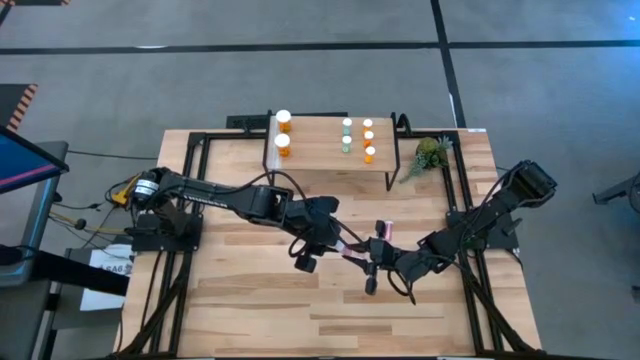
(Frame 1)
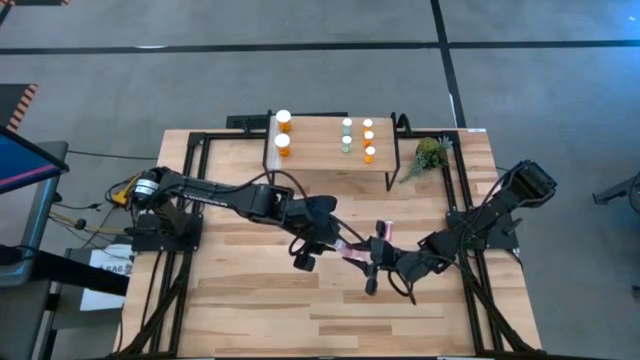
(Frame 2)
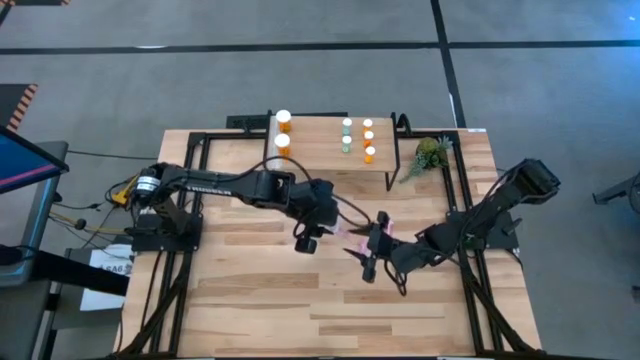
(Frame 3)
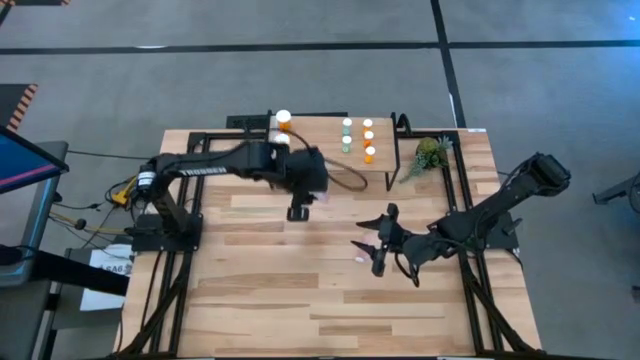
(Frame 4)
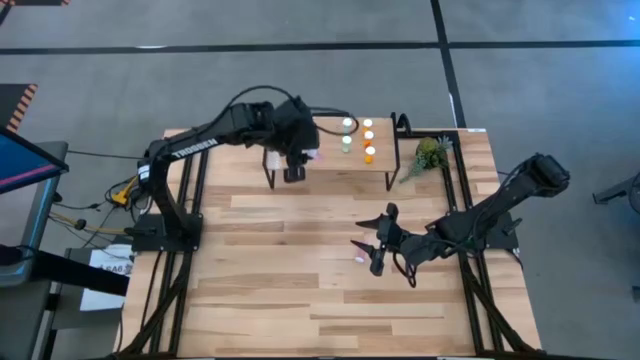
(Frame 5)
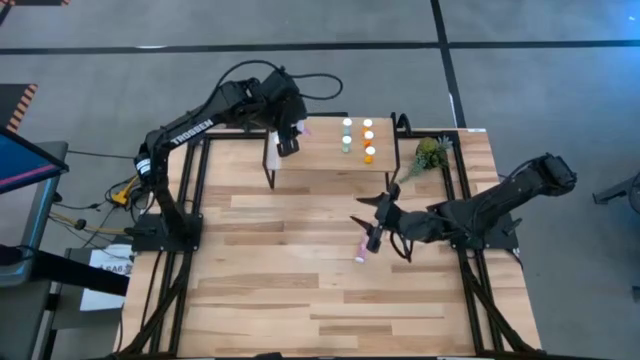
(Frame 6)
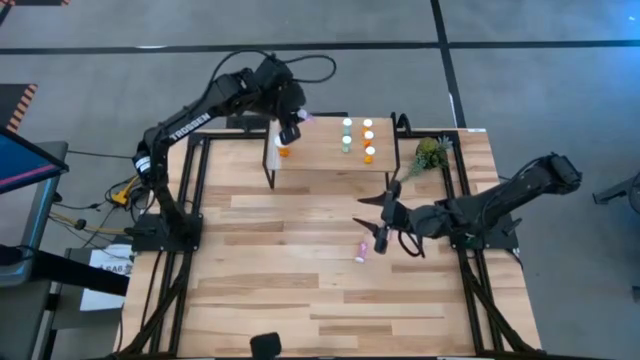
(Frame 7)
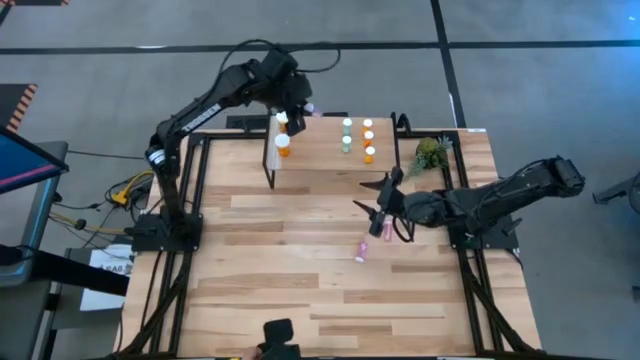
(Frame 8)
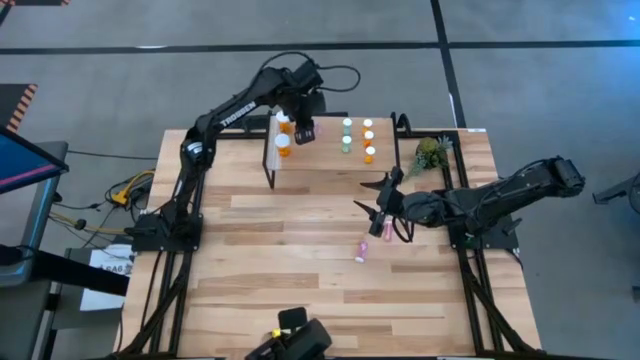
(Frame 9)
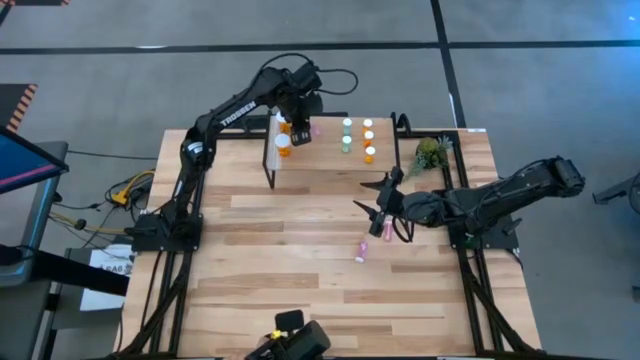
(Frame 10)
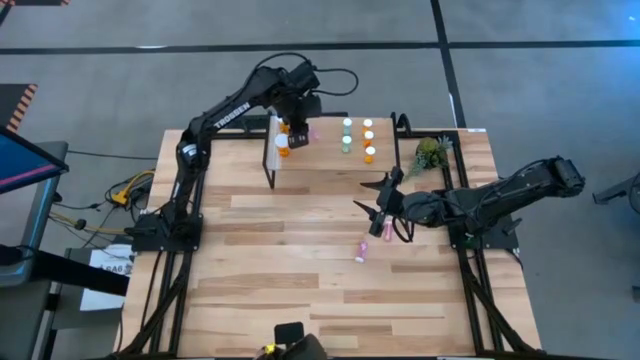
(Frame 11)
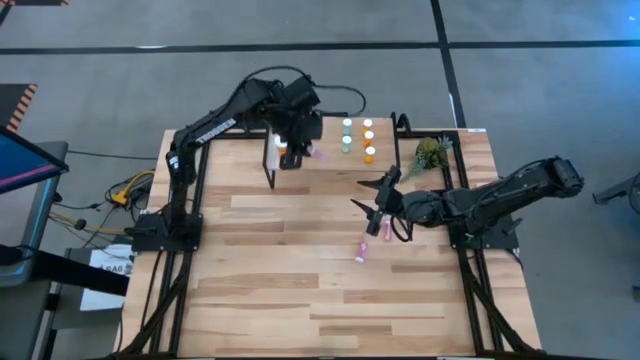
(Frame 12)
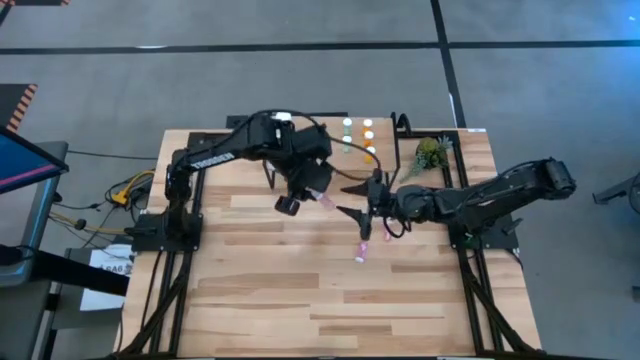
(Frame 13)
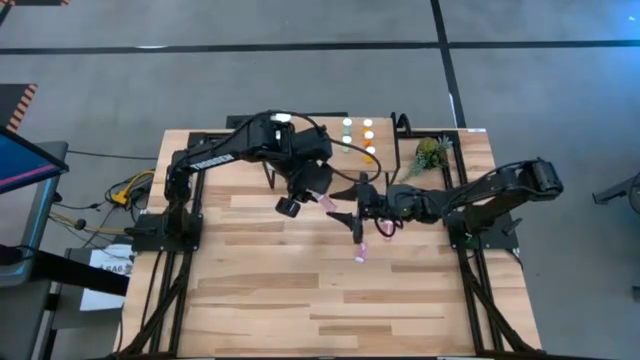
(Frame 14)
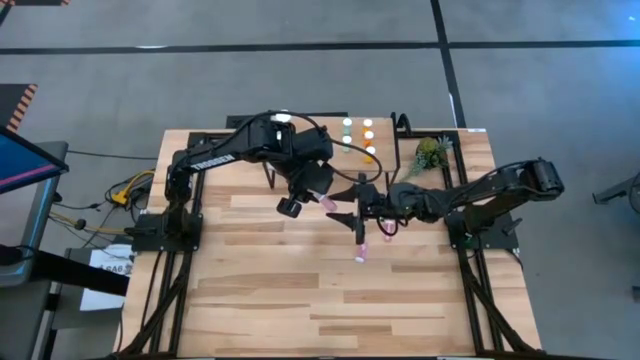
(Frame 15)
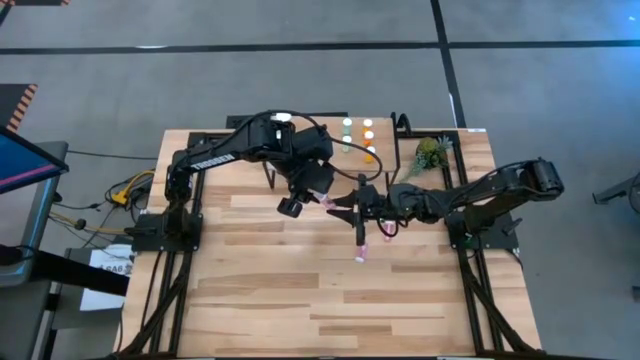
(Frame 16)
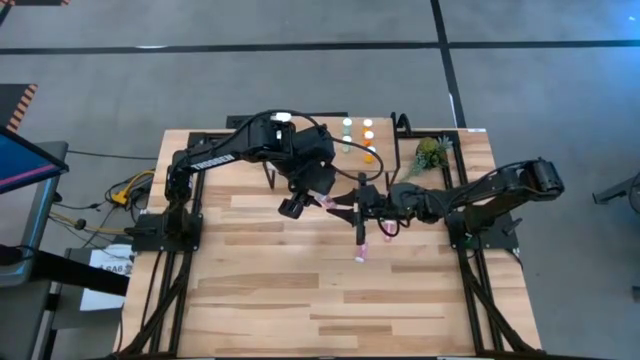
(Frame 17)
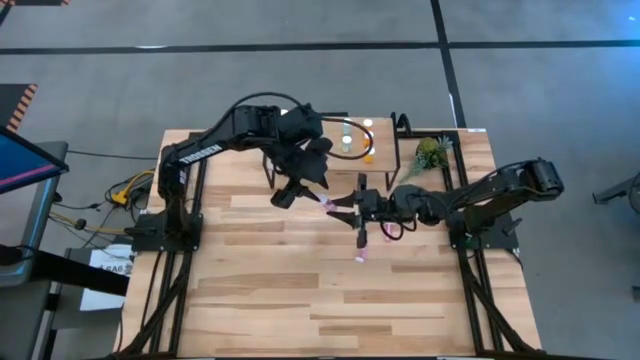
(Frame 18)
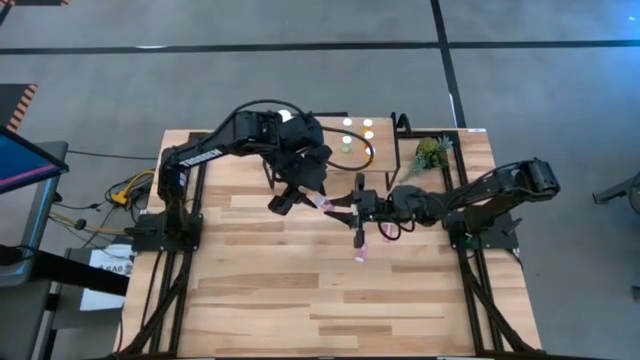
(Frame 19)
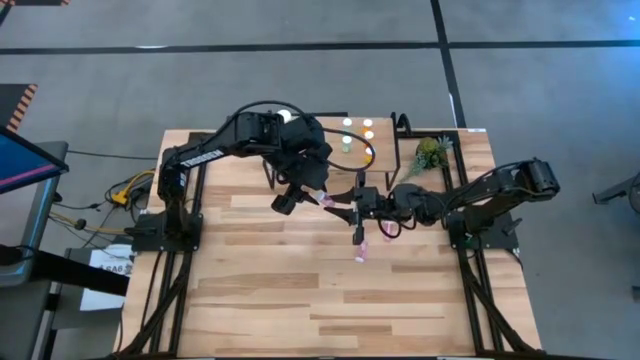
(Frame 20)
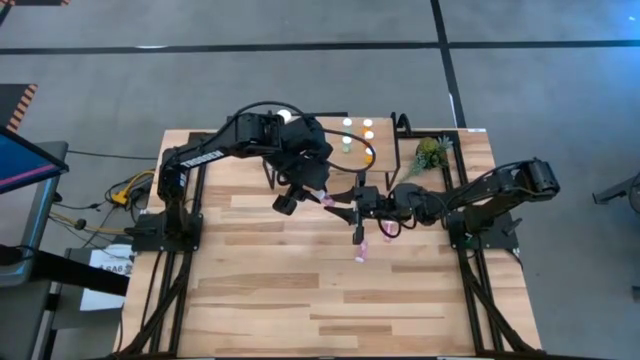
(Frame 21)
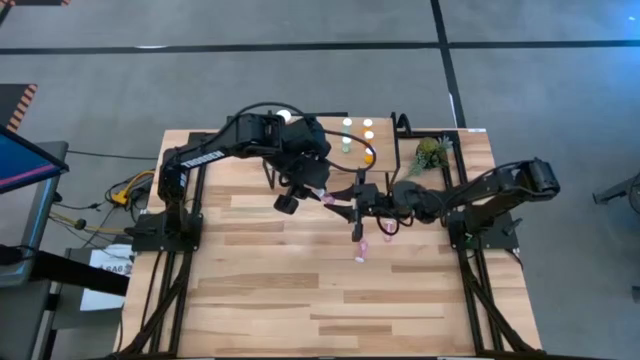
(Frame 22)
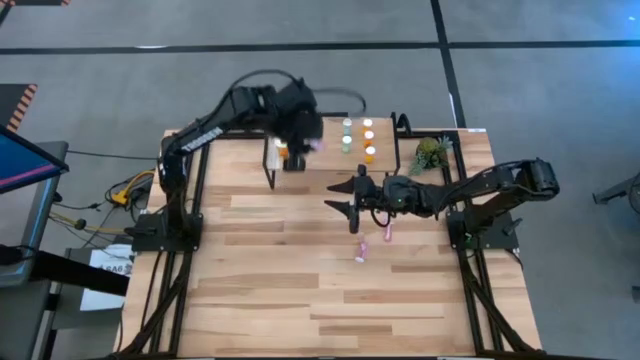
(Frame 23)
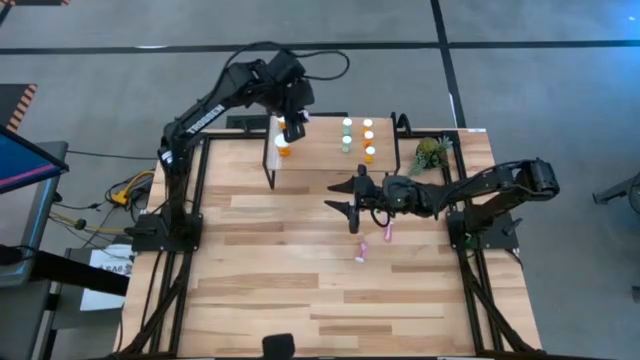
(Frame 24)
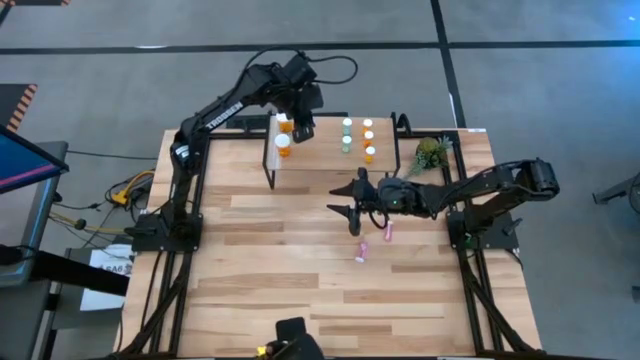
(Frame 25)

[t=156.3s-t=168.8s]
Task: Pick and place medicine bottles onto shelf by color
Put the bottom right pink pill bottle on the shelf

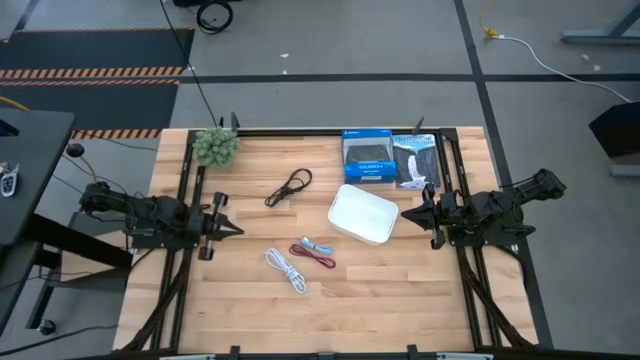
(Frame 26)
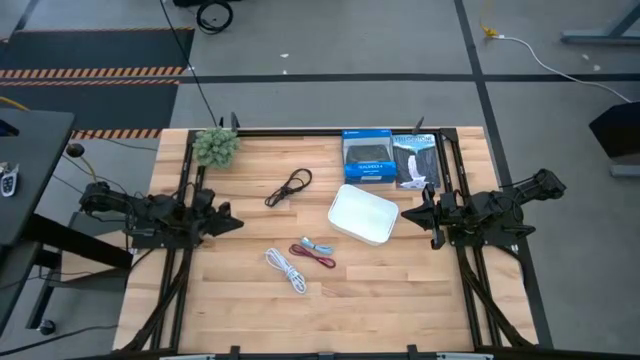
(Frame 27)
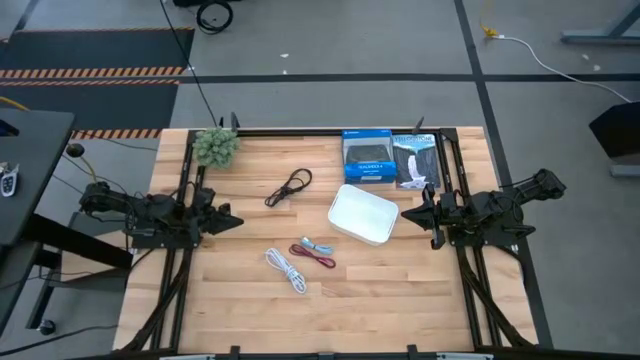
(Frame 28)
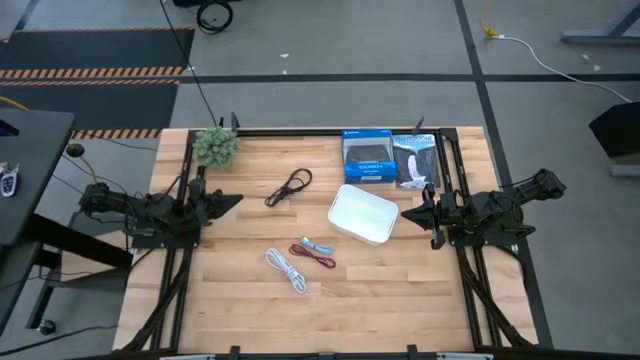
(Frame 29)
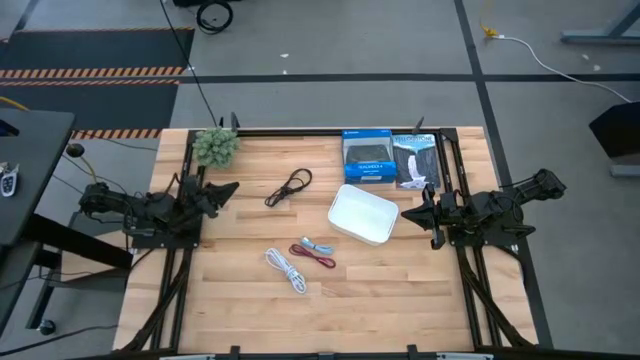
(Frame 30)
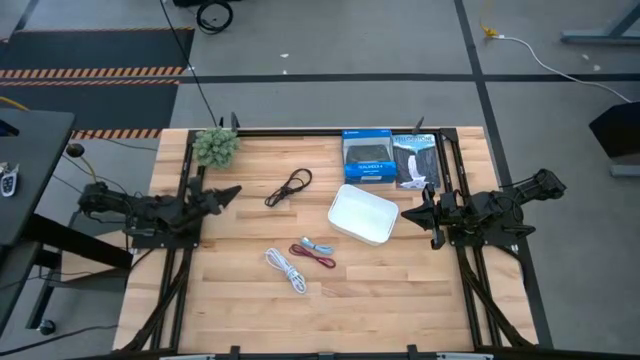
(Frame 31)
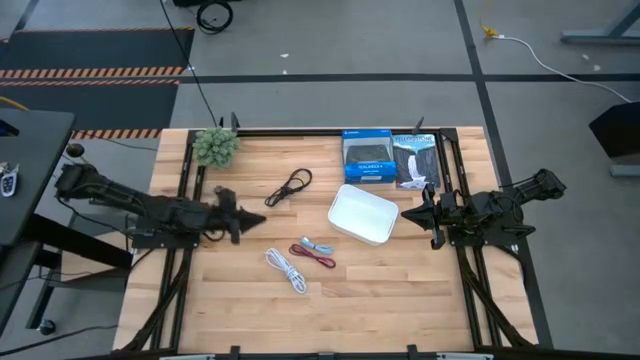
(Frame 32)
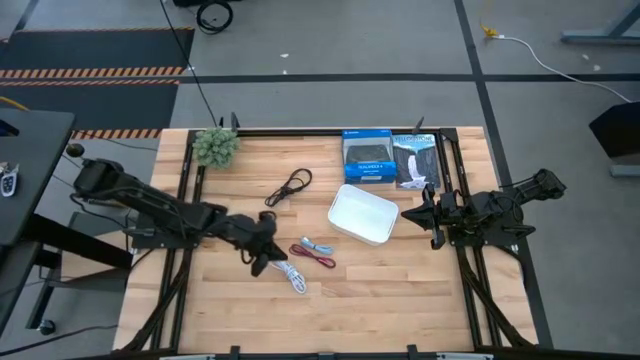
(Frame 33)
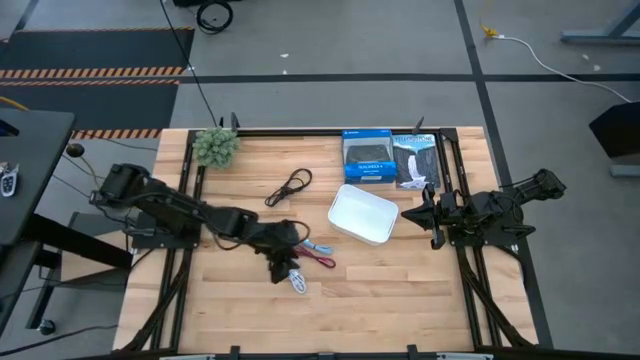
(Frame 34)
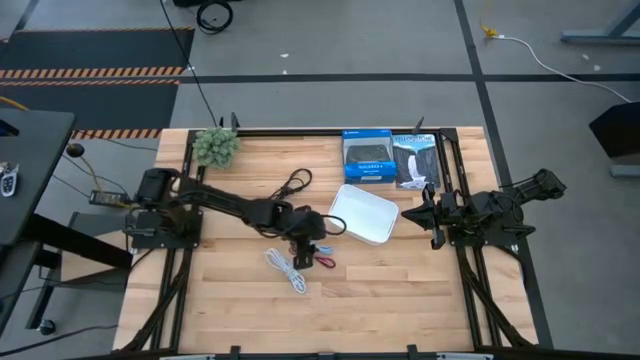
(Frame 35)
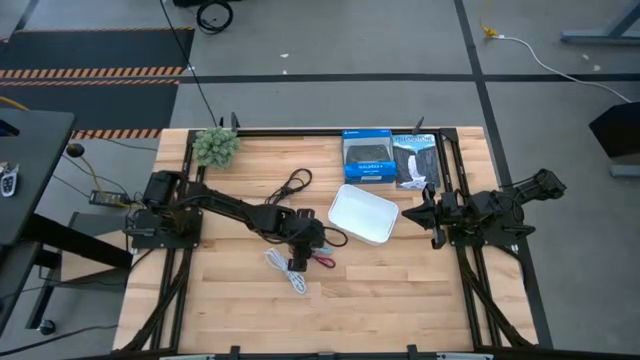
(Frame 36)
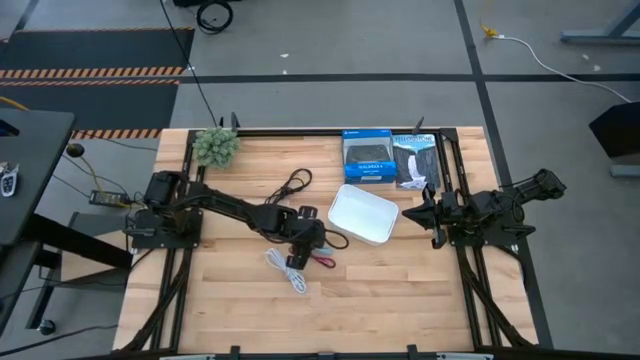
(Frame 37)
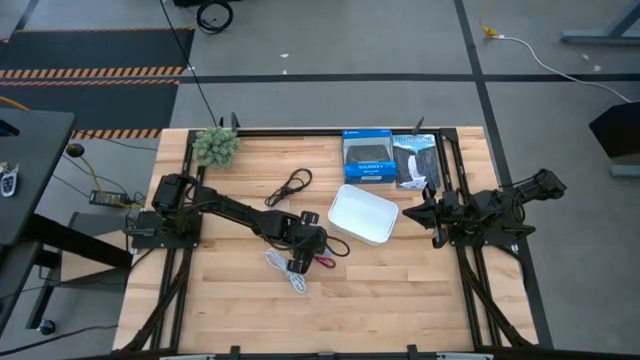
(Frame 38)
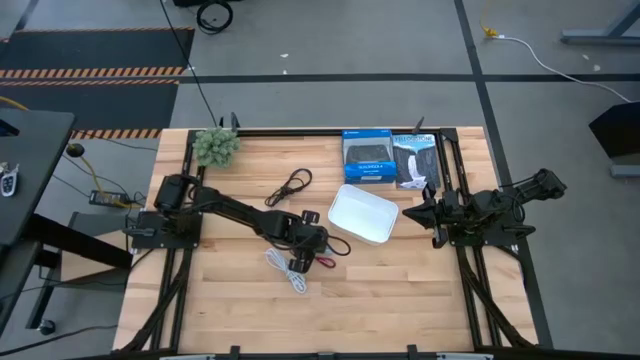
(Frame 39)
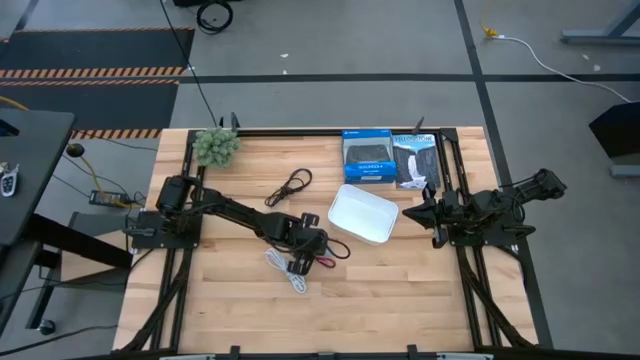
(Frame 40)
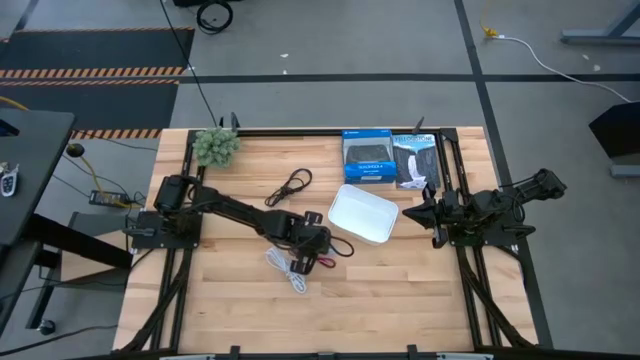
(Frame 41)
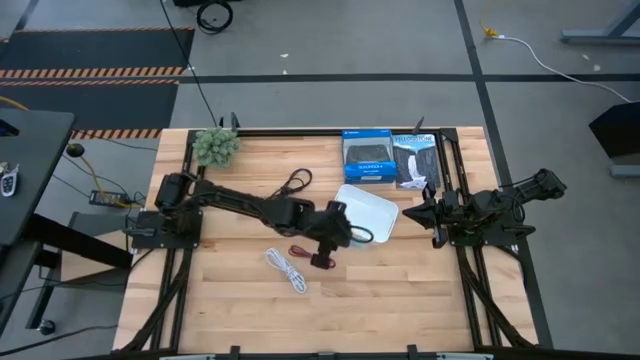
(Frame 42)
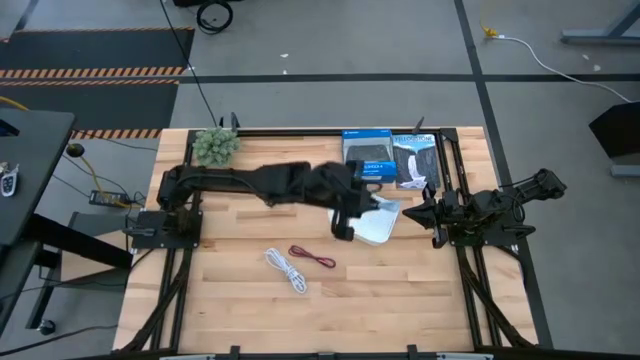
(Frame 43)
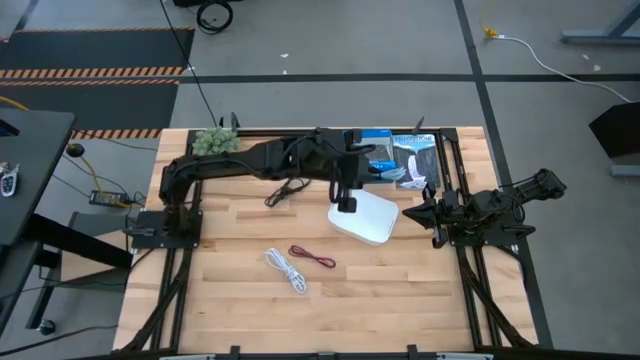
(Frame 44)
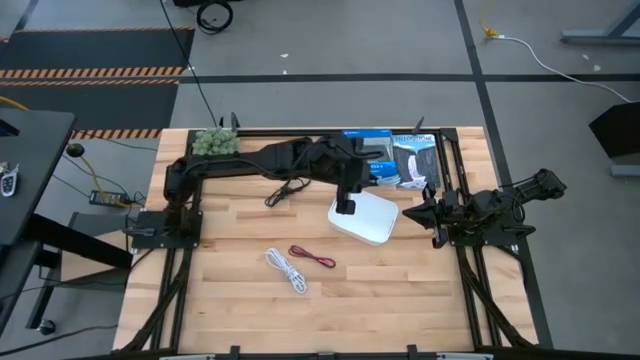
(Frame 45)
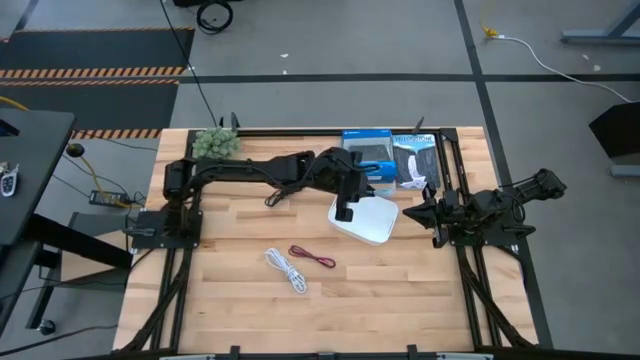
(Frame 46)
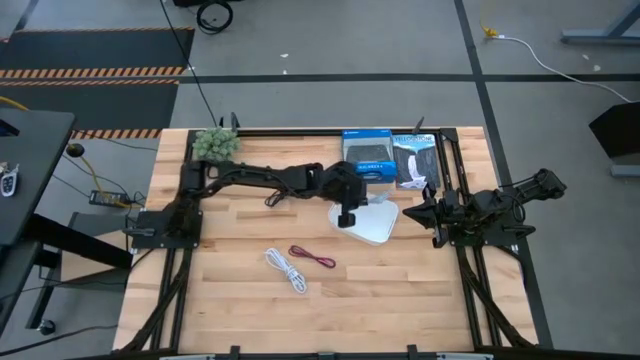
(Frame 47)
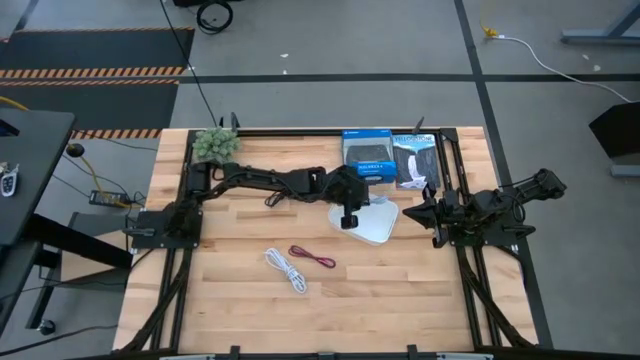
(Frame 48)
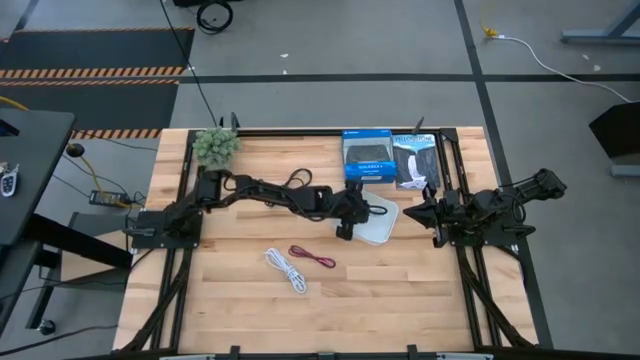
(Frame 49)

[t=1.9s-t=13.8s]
Task: Pick and place USB-C Cables
Put the blue charger cable into the white bin
